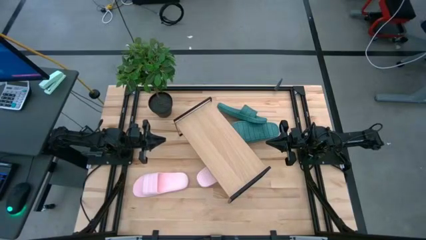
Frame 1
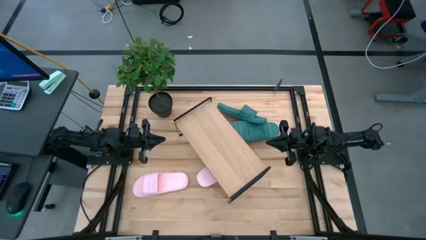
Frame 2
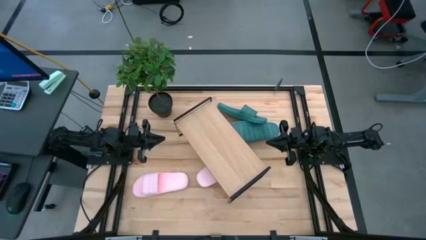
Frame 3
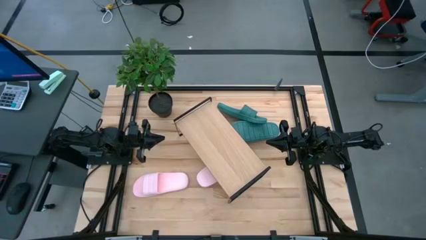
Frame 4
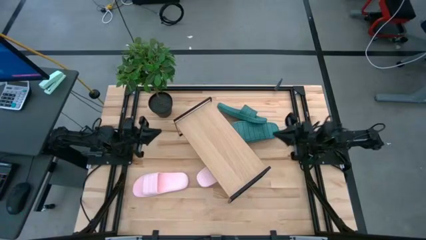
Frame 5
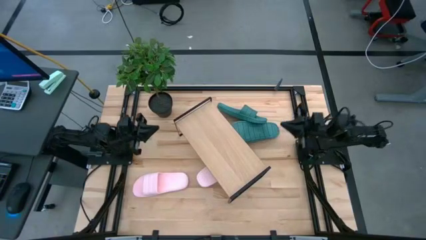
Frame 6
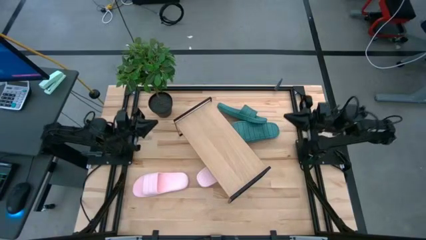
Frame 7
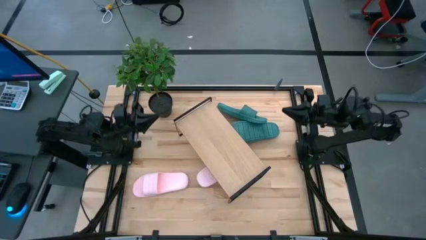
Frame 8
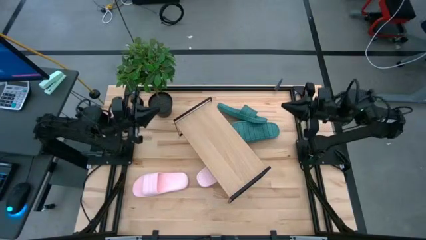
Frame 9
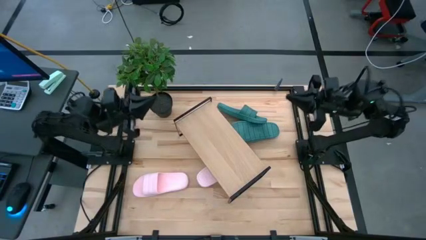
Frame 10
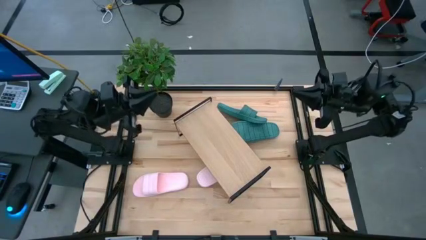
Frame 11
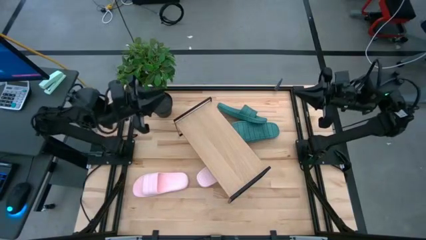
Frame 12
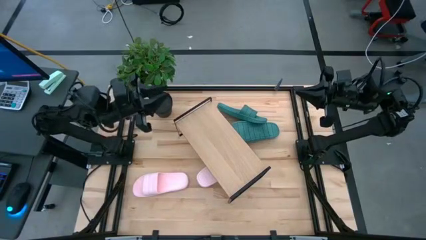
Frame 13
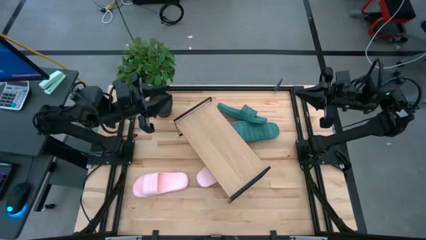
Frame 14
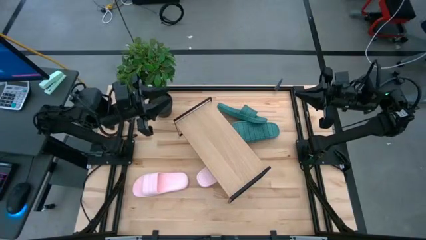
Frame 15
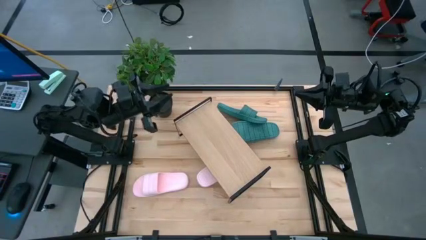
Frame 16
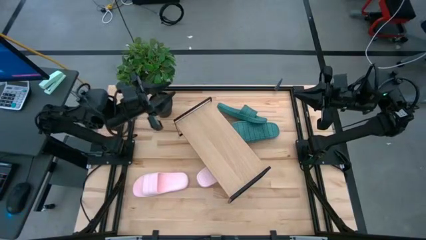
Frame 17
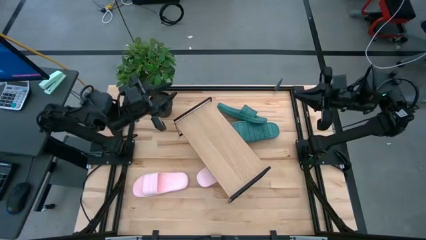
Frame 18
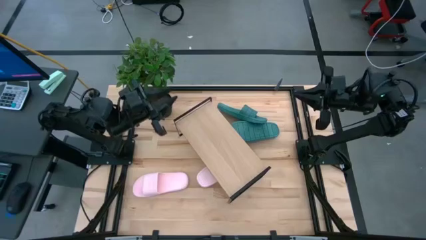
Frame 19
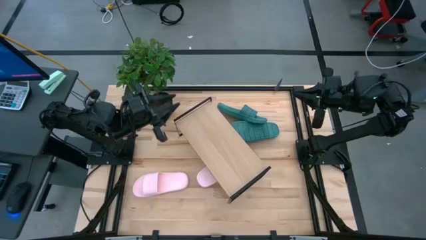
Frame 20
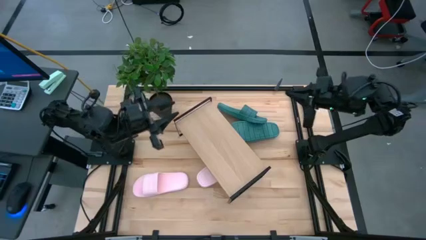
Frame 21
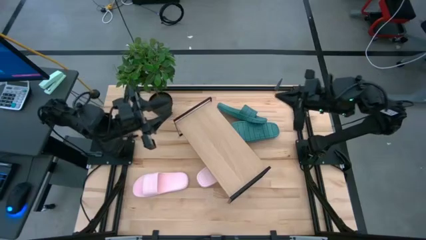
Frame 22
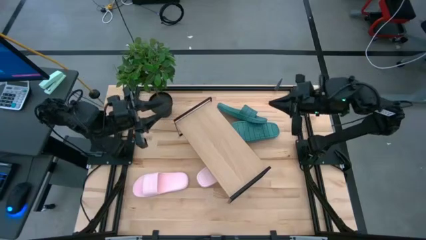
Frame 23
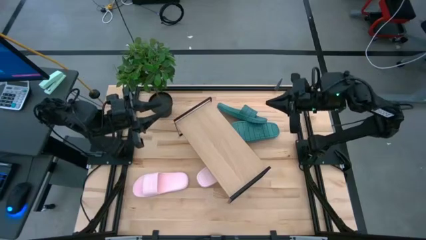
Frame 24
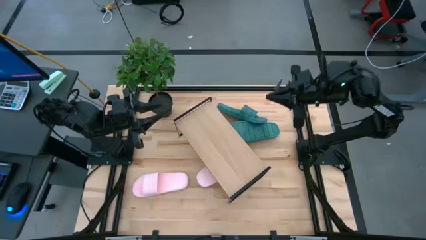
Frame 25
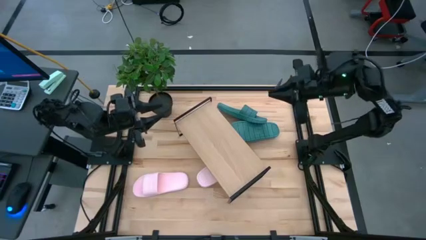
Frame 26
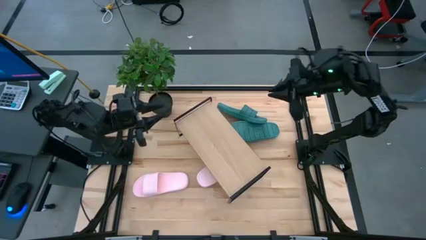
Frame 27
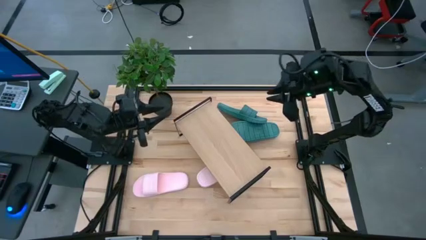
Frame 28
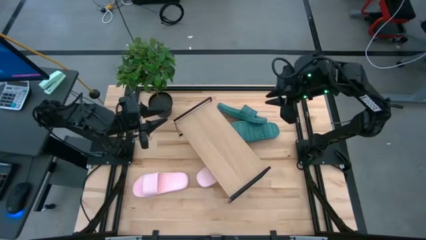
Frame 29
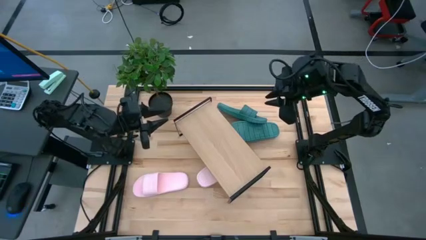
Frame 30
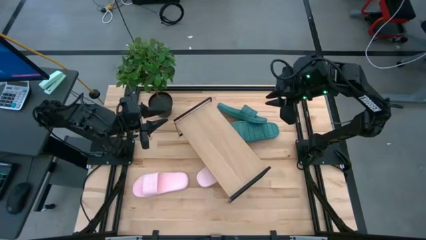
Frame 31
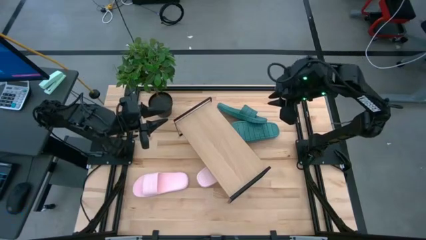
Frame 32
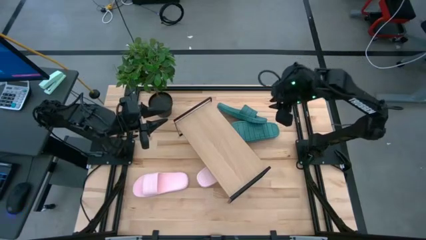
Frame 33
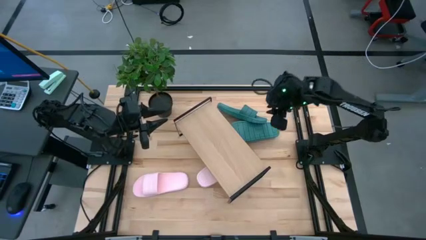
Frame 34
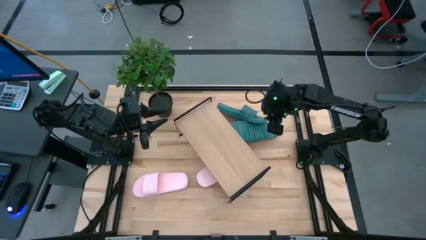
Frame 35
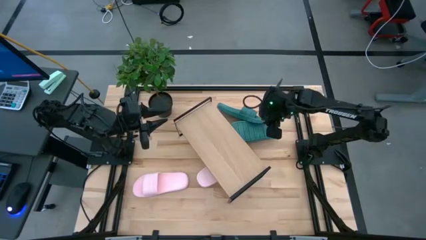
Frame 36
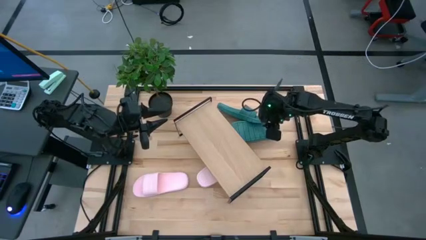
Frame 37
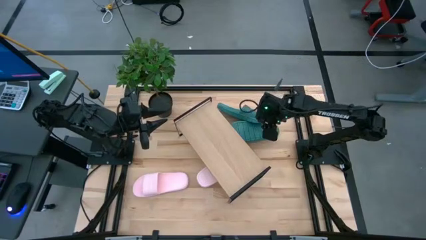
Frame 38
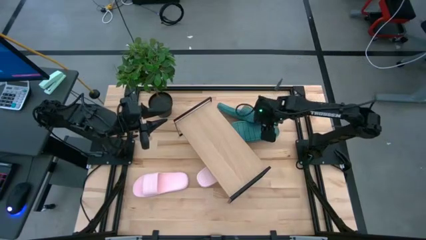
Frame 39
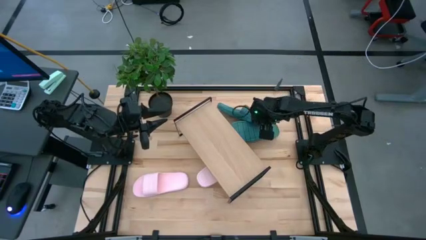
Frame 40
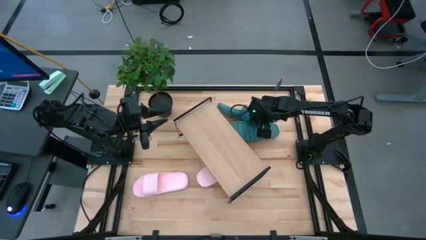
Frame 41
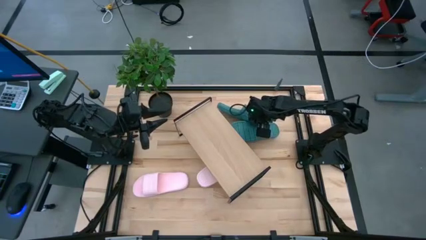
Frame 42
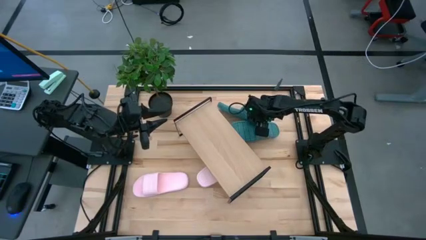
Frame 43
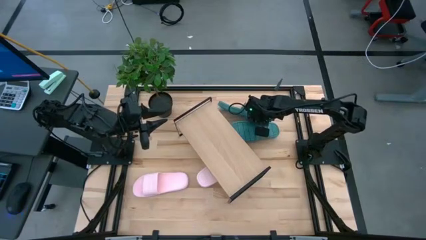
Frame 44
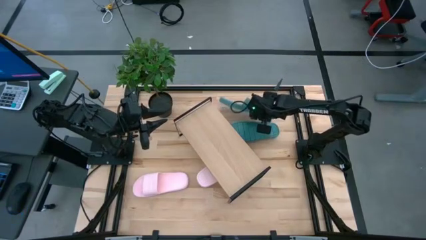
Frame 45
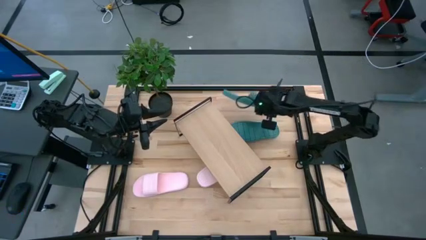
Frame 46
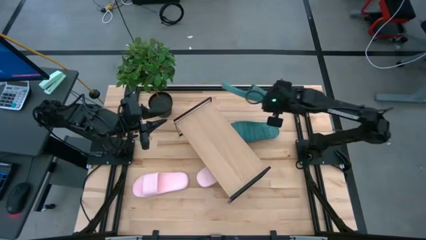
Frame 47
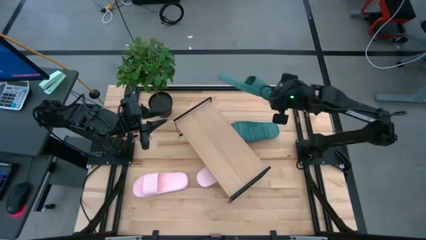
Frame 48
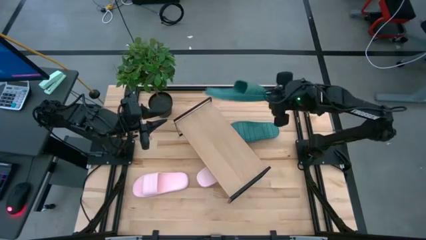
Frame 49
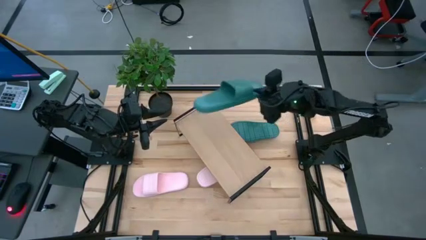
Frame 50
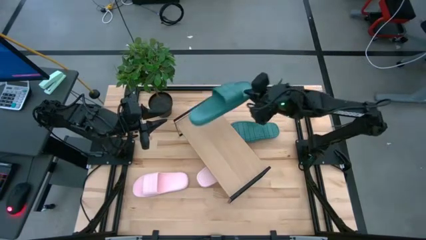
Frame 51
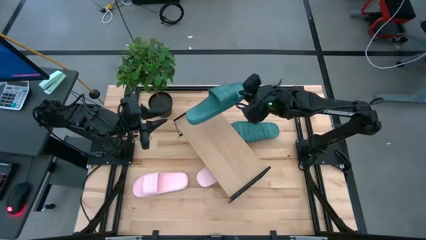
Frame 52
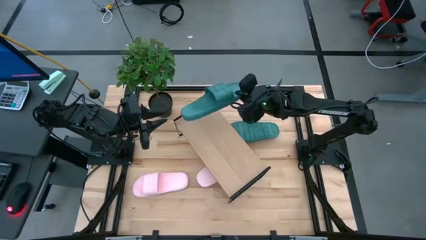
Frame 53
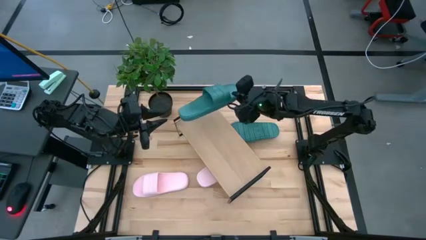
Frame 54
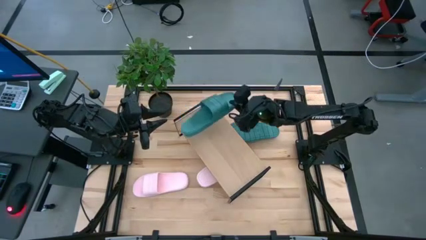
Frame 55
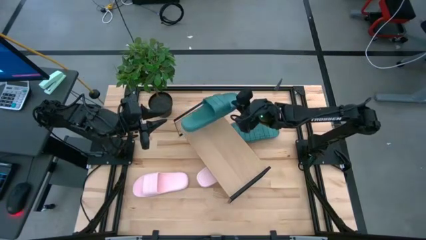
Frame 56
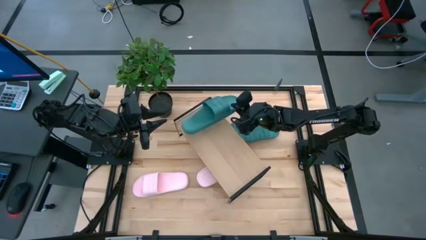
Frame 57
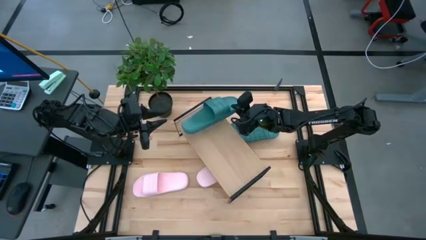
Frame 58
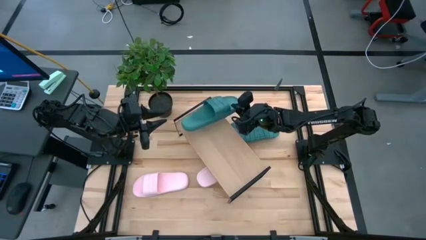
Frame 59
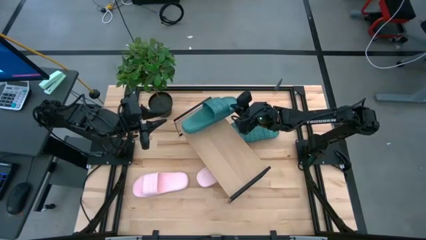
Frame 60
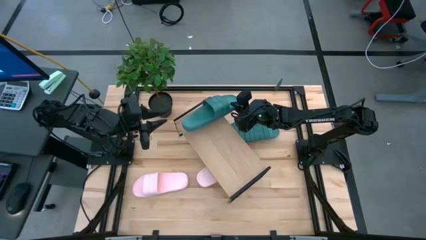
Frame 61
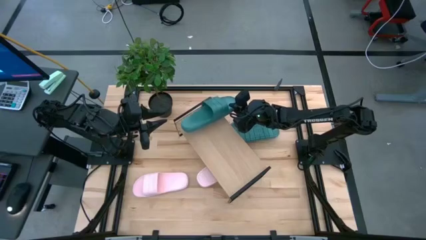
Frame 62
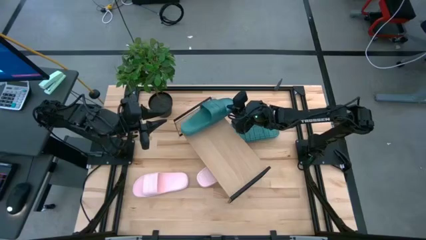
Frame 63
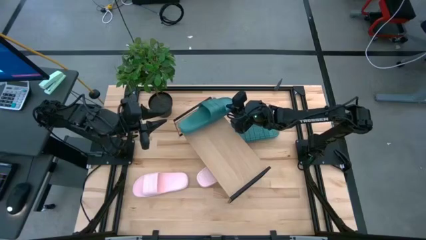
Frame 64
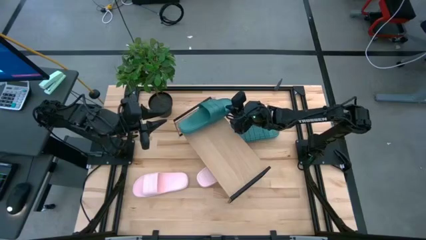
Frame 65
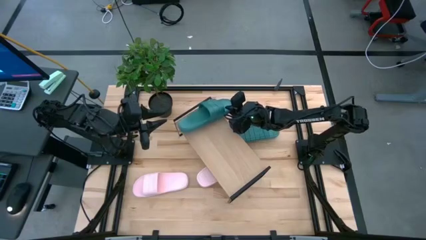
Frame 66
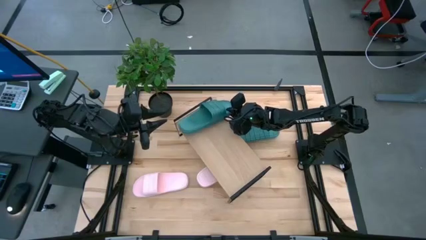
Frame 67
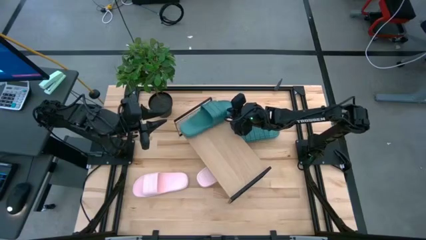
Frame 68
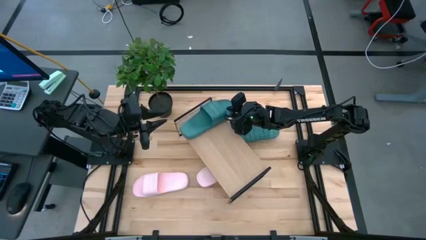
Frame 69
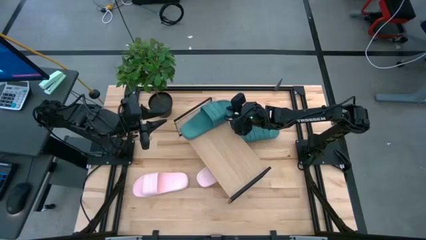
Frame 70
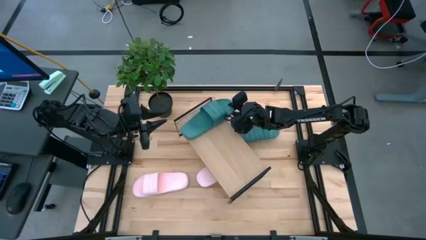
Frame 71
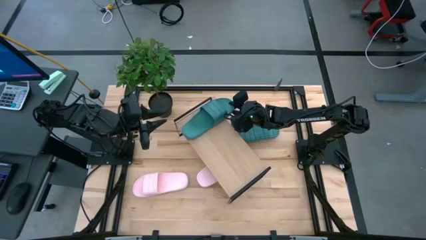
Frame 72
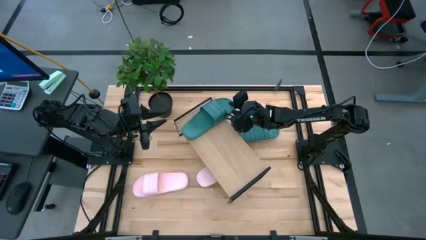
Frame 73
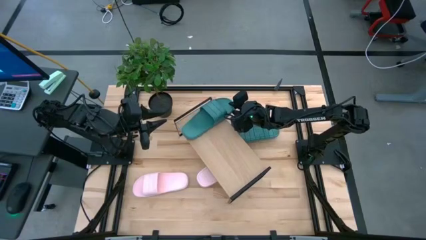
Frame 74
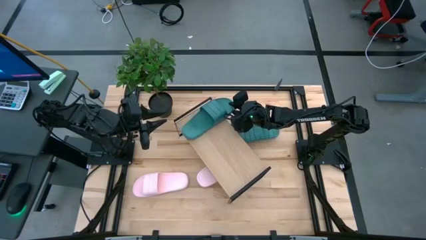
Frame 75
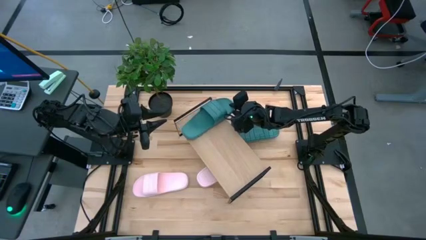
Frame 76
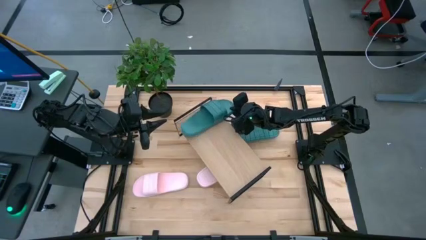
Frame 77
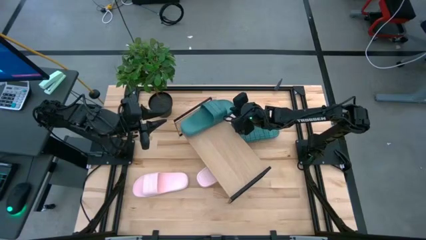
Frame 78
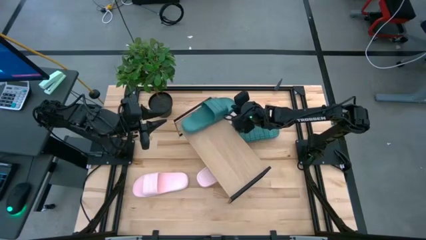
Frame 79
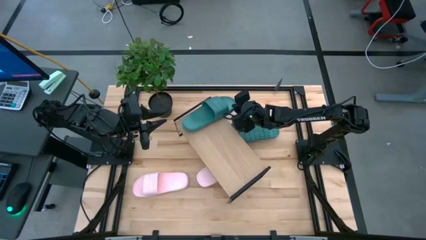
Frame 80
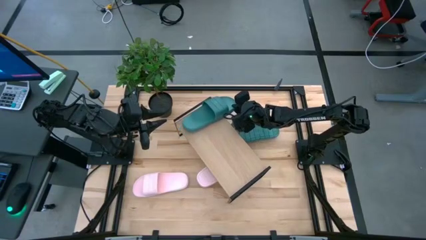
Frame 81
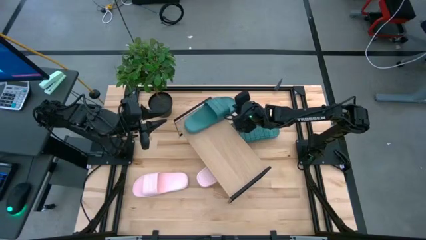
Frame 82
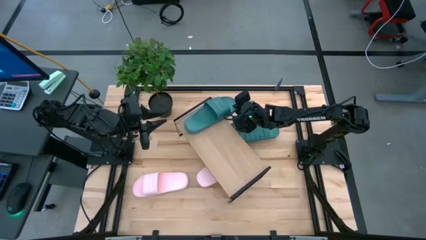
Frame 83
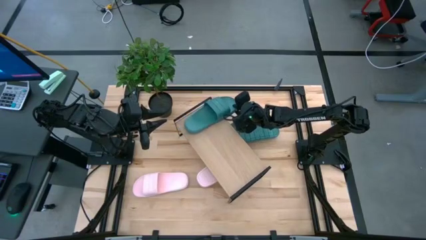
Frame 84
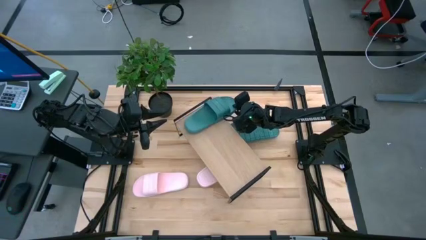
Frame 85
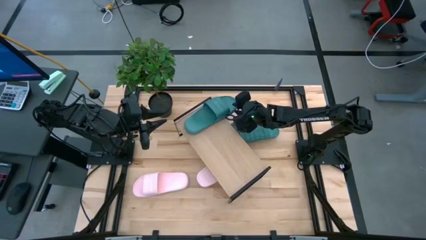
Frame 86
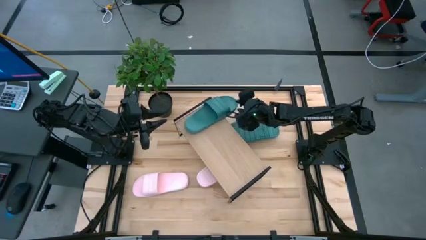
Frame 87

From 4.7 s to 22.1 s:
Task: Pick and place slides into the shelf
Put the top green slide on the shelf
